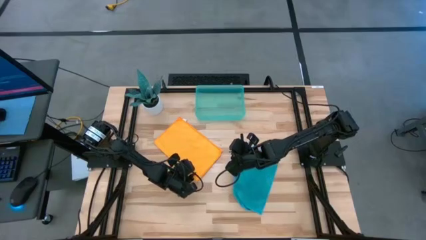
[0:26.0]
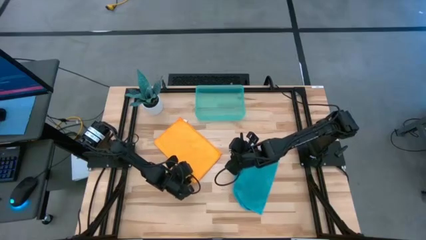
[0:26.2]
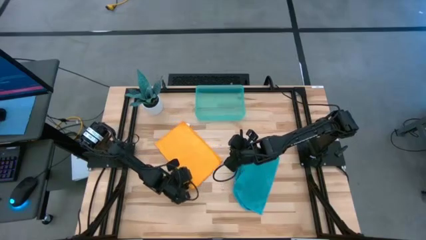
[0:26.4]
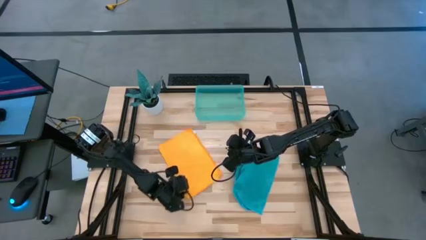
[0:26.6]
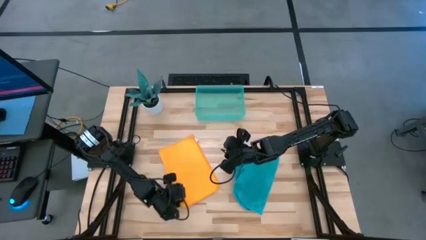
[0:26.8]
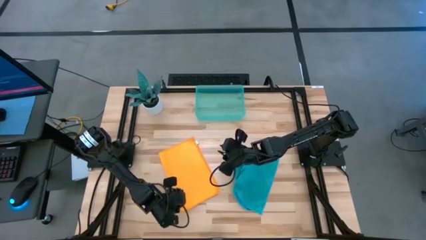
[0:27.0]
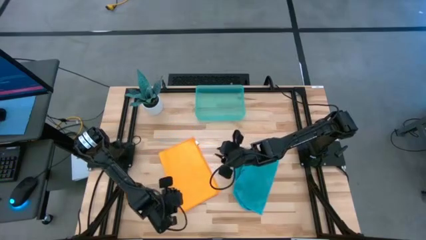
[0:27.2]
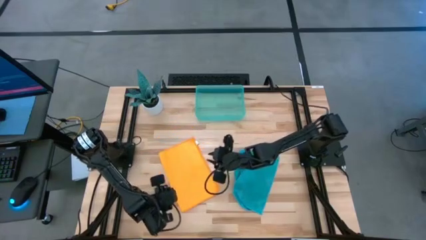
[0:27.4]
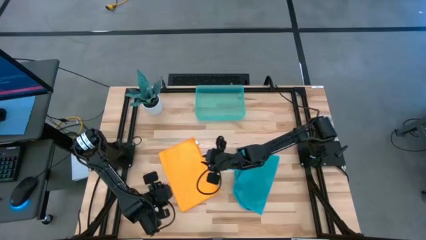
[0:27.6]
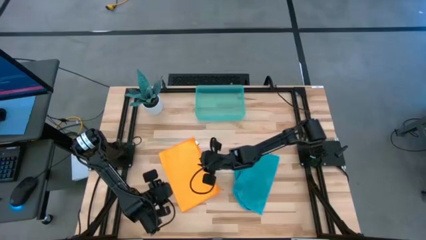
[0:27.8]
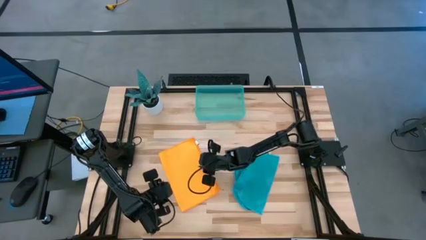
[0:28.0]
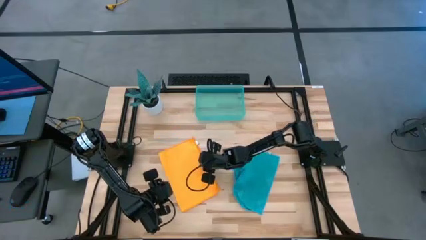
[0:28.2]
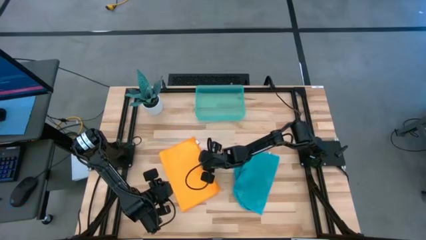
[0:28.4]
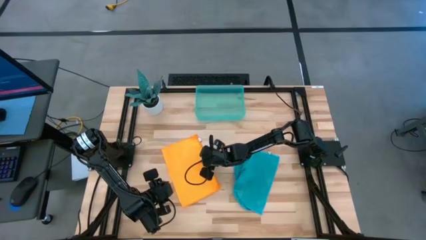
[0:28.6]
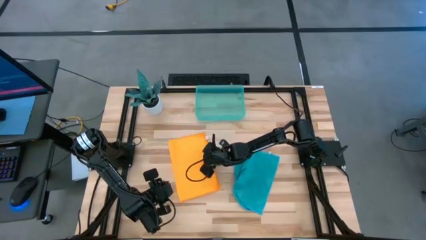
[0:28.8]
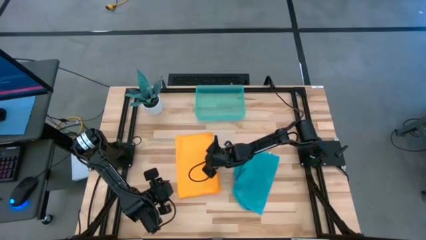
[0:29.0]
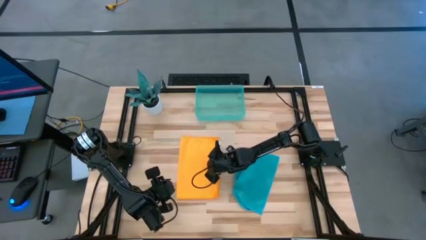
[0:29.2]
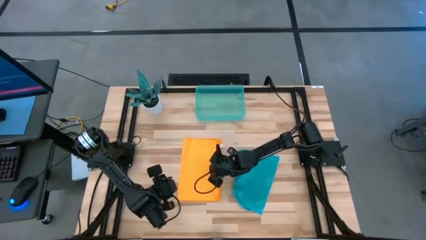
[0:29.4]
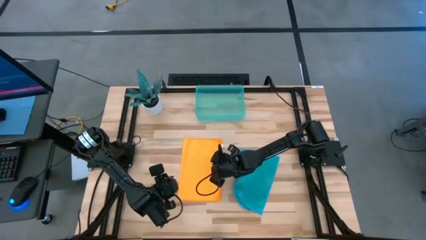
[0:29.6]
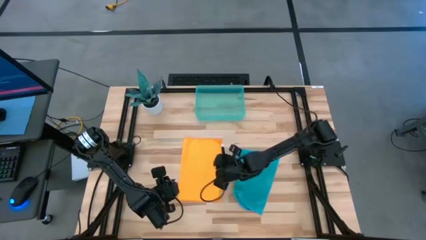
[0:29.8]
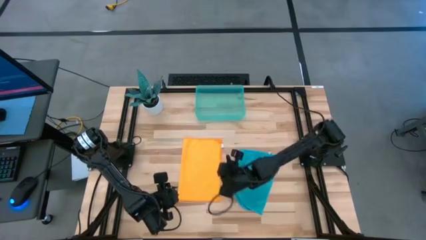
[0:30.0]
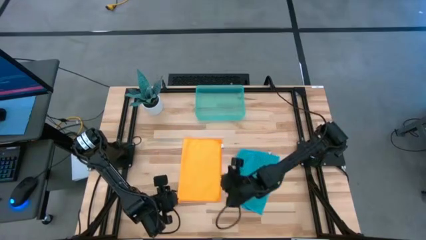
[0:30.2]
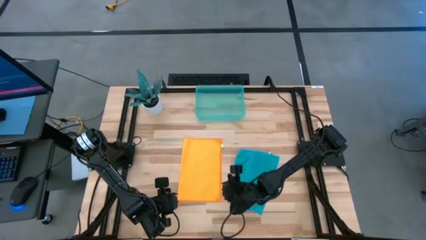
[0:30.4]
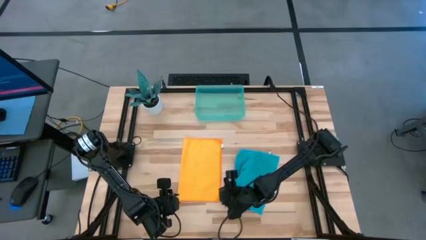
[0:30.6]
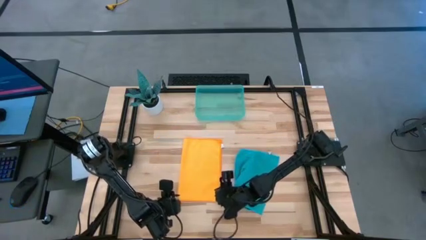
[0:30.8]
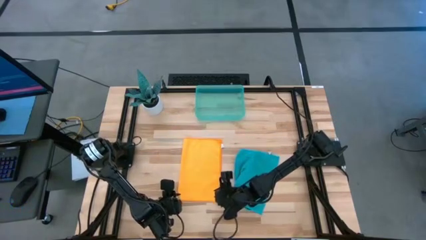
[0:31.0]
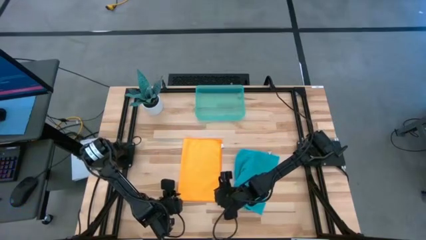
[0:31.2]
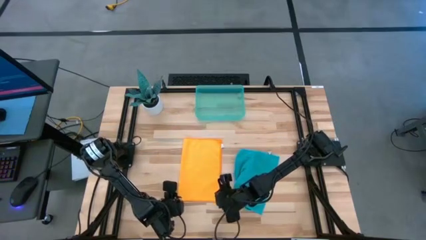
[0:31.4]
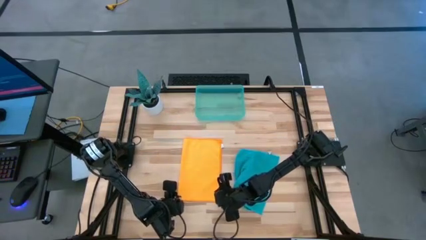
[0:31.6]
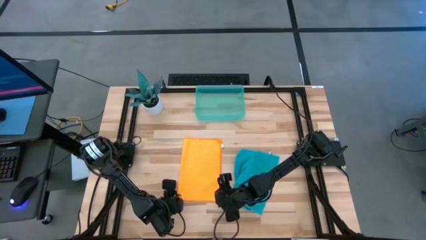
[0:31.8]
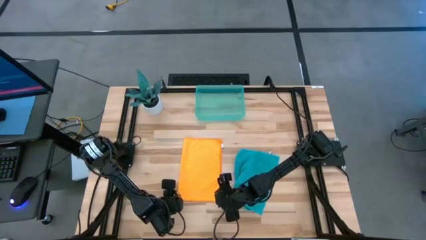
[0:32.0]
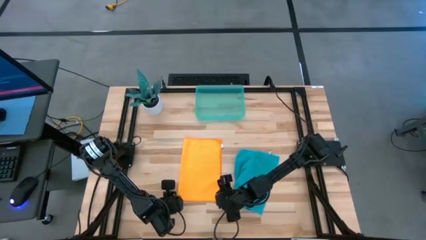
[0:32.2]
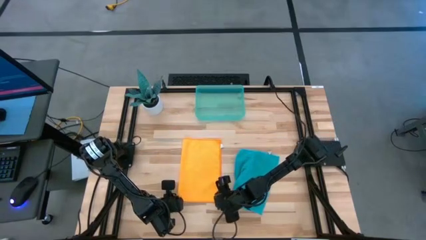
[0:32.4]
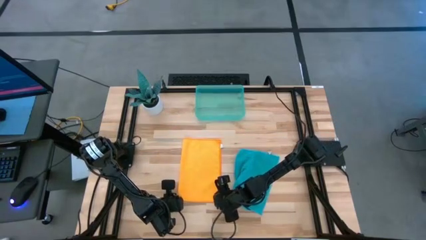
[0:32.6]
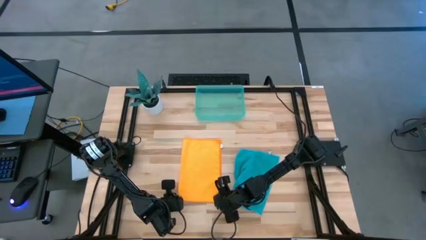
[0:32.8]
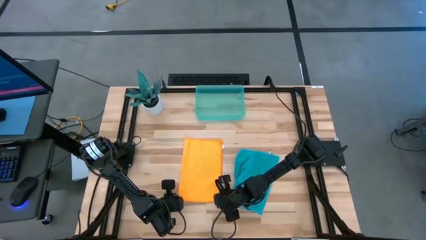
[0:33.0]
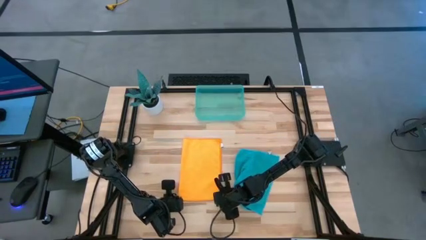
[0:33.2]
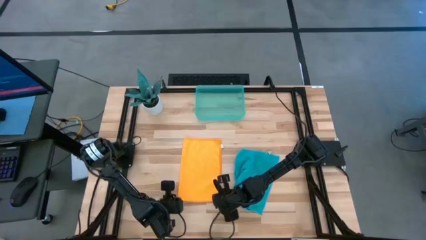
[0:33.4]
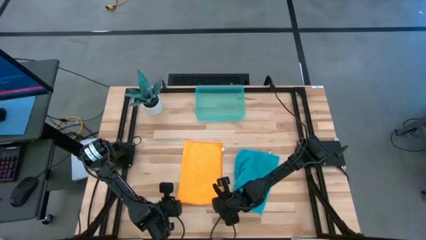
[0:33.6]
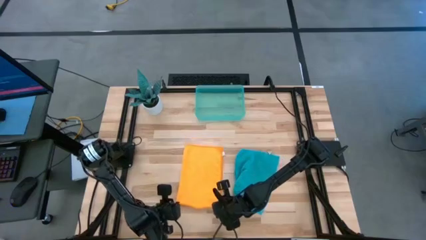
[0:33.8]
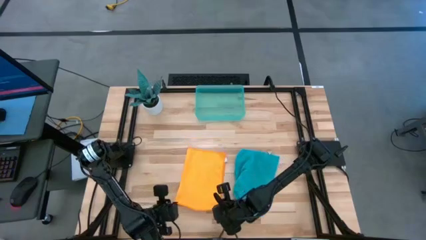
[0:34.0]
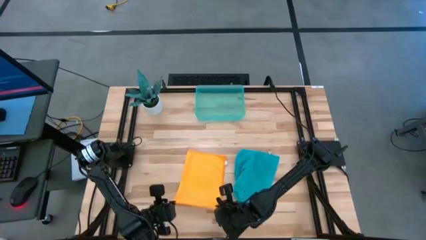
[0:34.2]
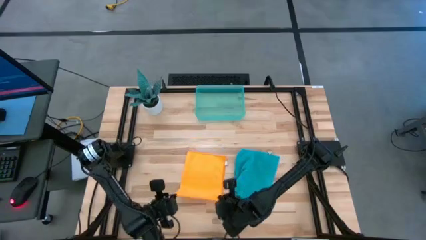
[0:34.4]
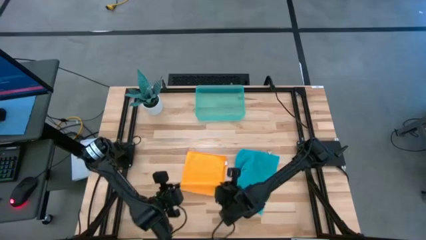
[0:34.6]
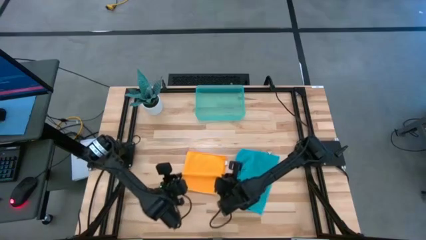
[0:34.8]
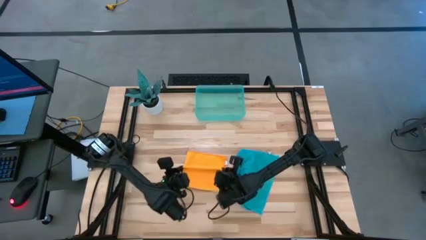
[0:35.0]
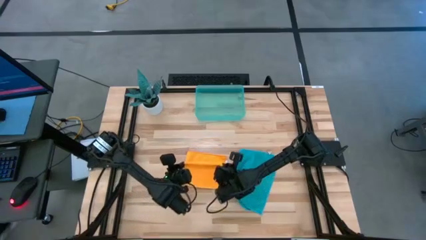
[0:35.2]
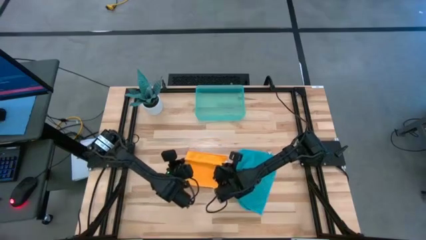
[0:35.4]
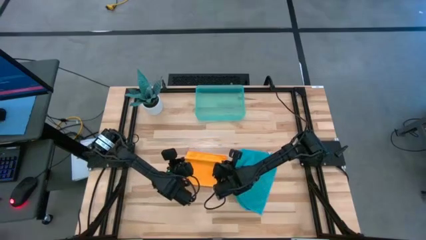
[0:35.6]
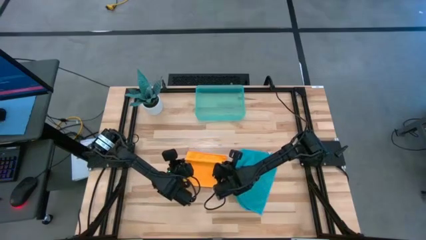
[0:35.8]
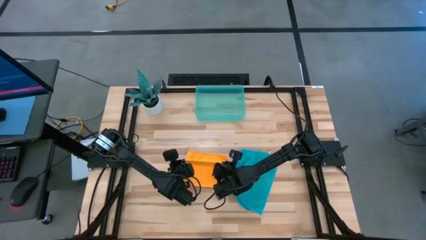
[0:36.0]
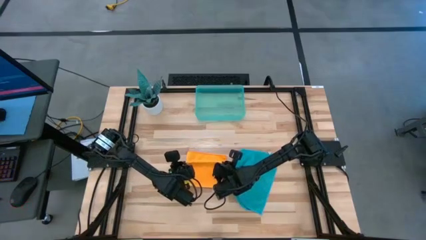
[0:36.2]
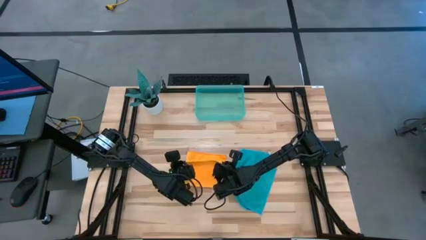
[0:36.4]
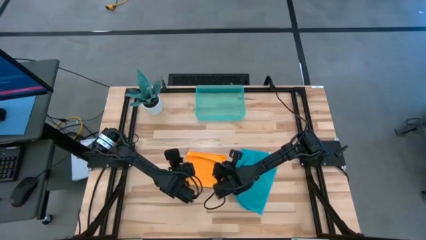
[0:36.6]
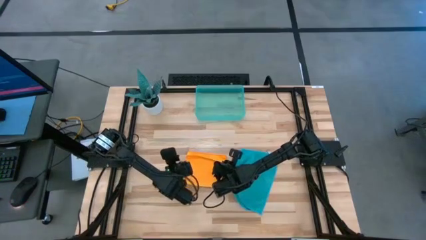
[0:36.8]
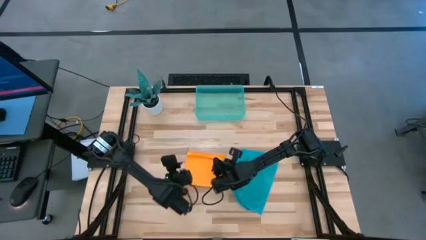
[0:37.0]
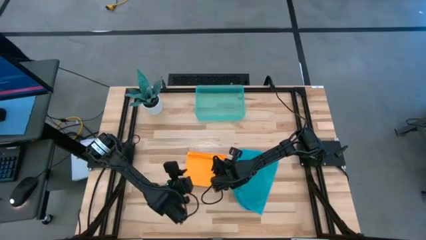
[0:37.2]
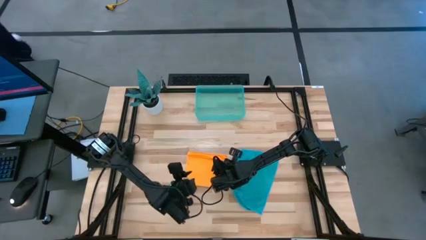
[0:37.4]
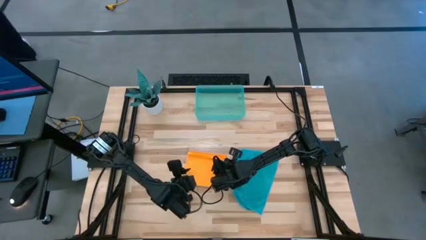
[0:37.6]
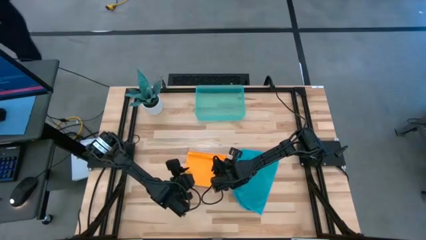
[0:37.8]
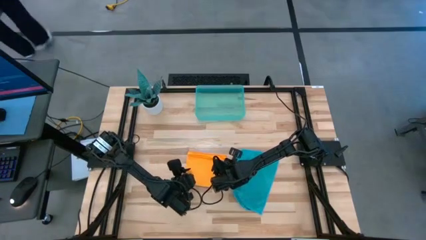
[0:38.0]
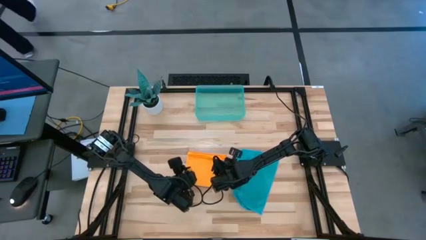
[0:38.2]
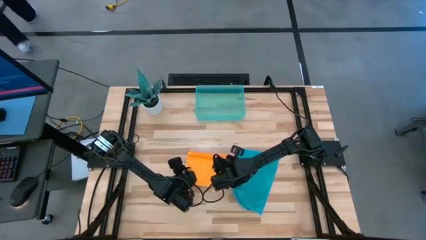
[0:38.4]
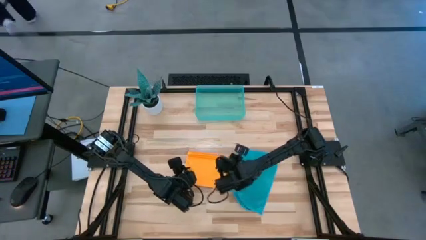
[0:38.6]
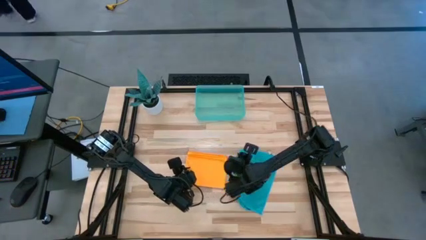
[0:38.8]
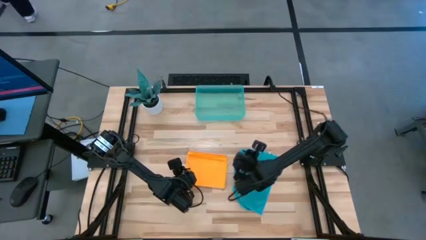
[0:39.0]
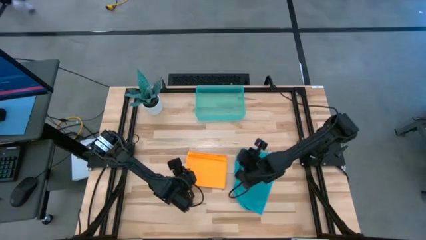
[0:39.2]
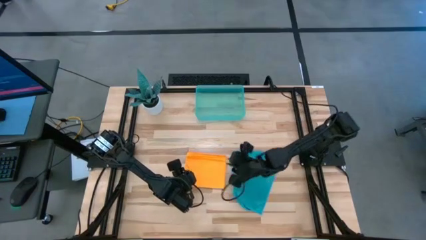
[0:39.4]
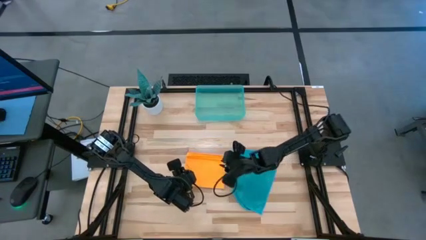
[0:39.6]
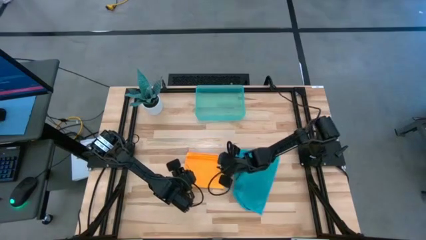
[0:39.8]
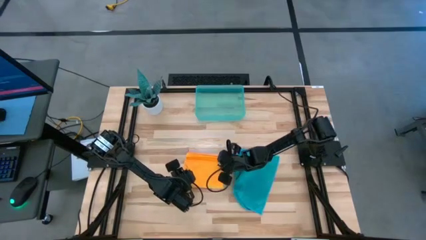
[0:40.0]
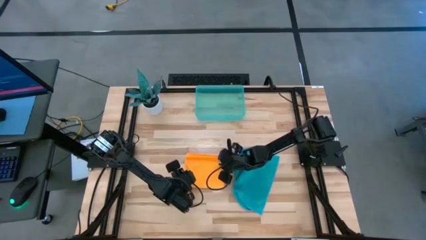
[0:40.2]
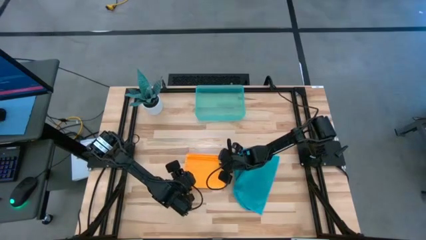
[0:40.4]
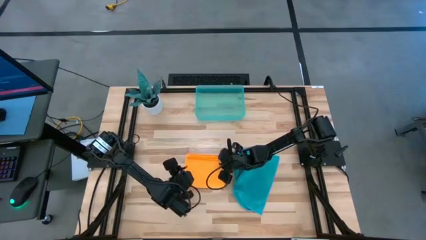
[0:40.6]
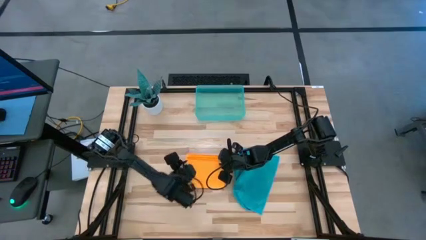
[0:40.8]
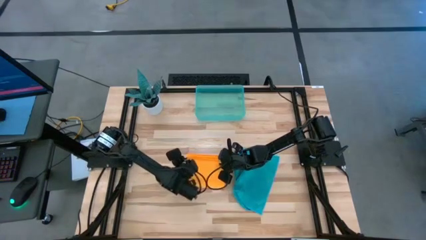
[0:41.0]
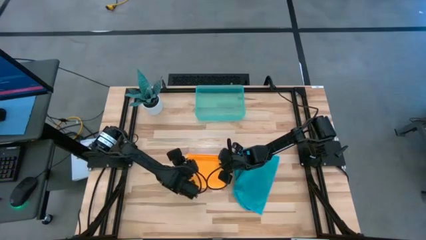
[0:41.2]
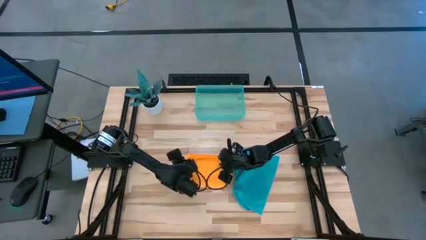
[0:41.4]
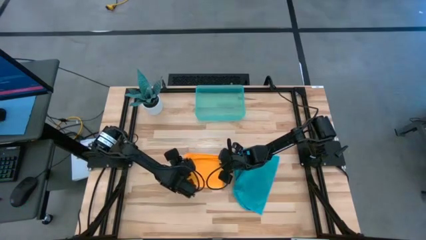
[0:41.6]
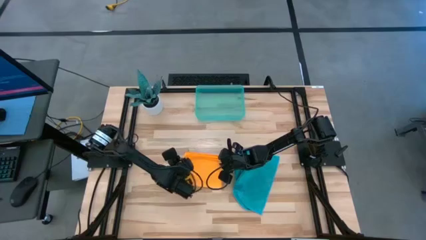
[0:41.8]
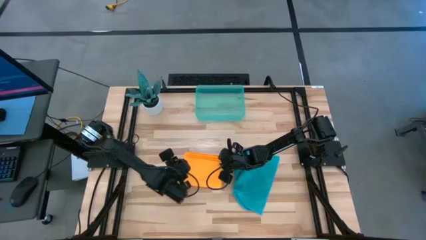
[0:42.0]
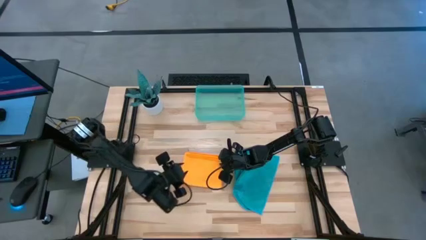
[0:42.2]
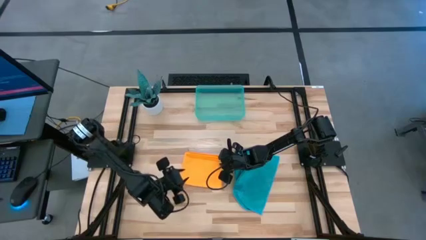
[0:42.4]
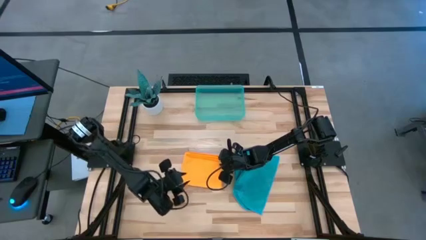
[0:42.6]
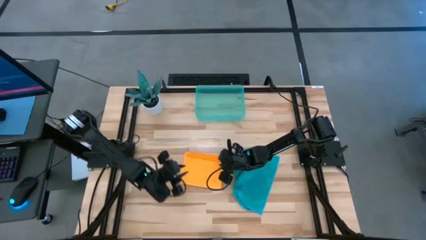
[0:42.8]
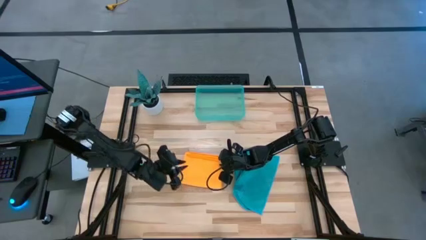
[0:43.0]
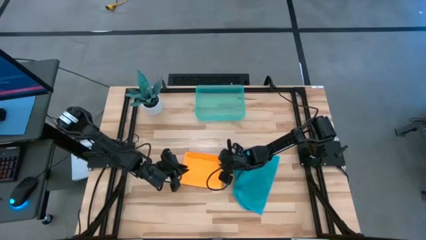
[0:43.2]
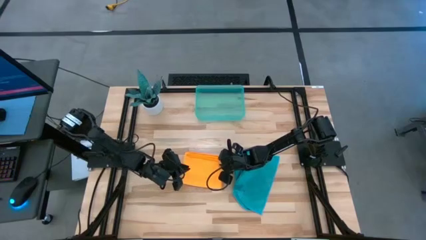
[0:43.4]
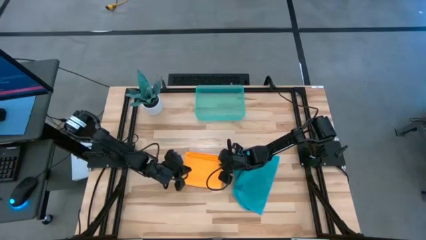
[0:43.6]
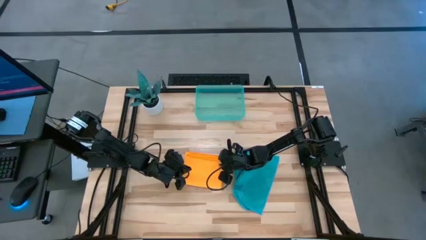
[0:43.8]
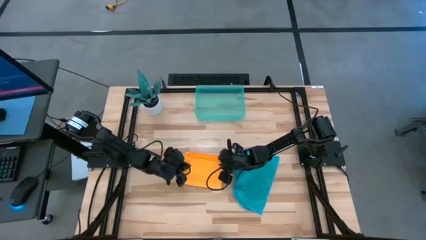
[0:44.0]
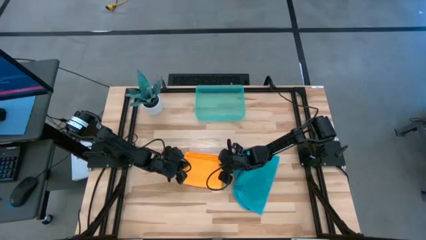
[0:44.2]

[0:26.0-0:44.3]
Task: Roll microfiber towels into tight, uniform cylinder then place into a basket
Roll the yellow microfiber cloth
